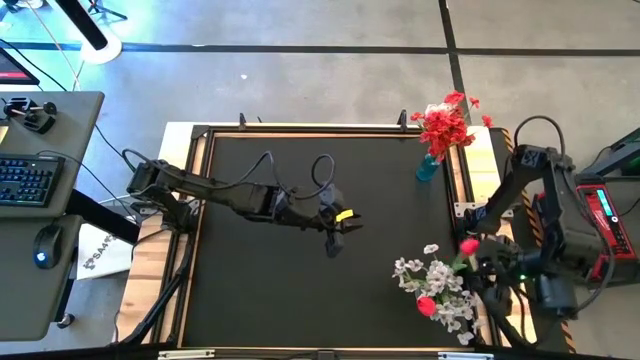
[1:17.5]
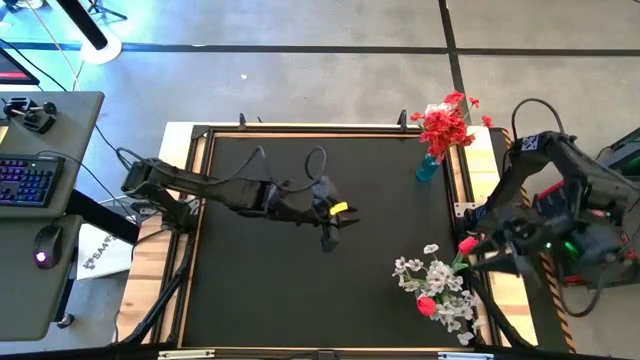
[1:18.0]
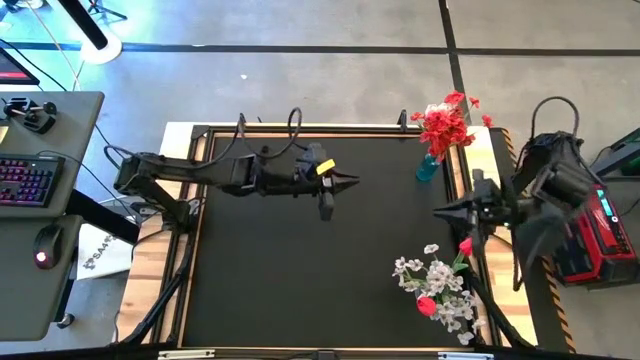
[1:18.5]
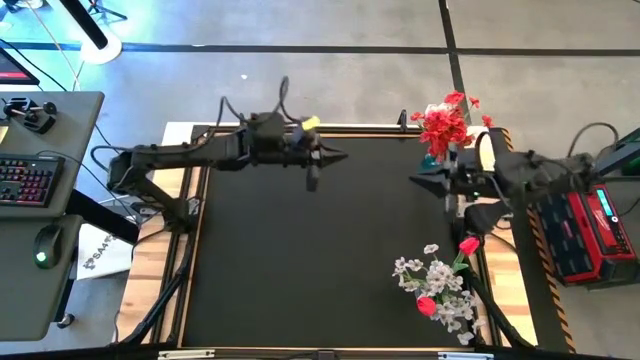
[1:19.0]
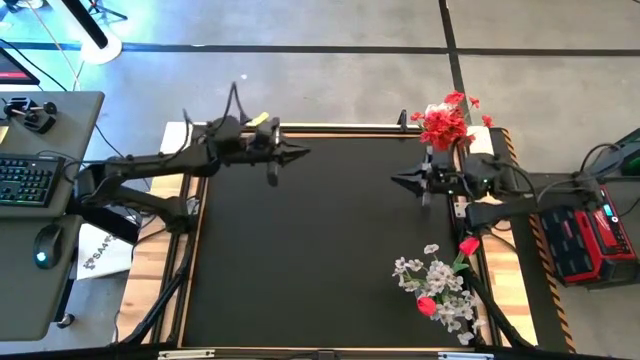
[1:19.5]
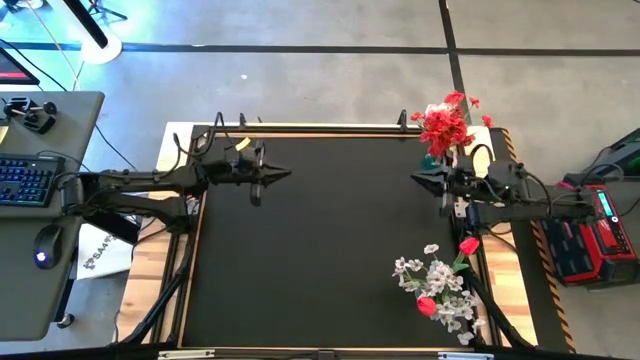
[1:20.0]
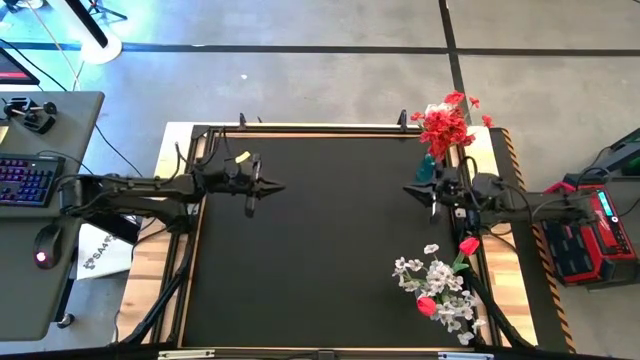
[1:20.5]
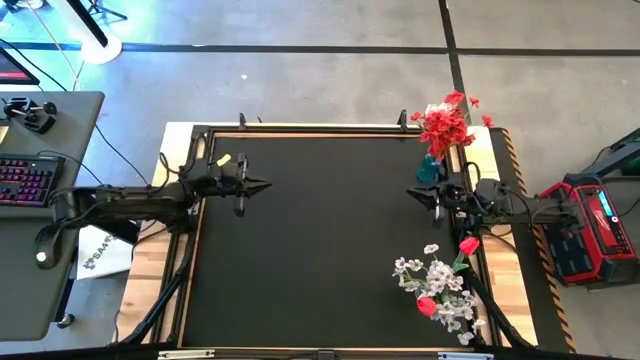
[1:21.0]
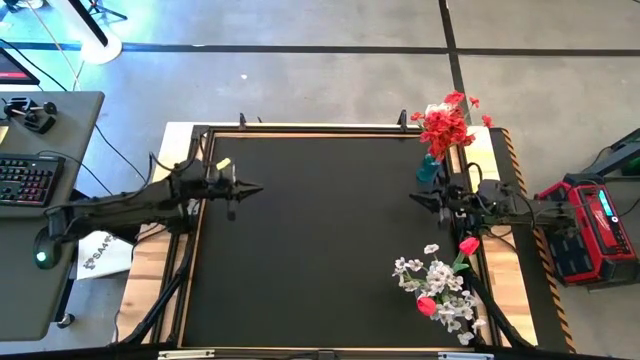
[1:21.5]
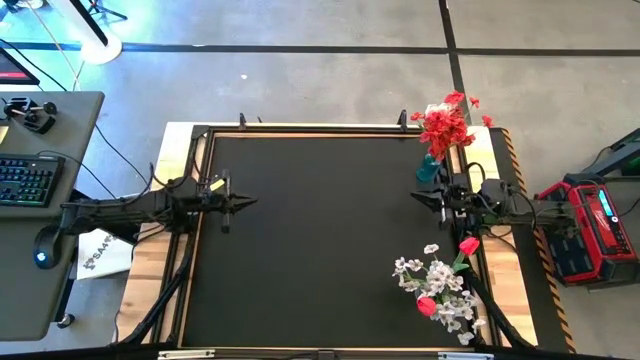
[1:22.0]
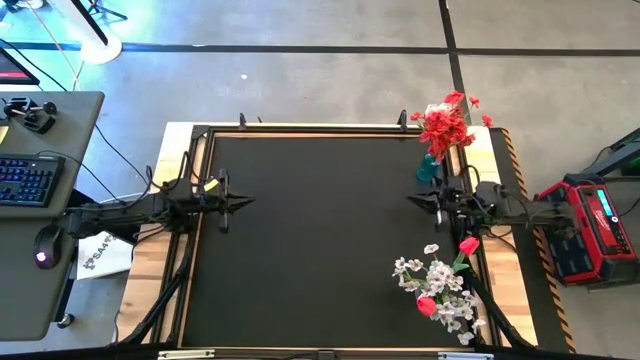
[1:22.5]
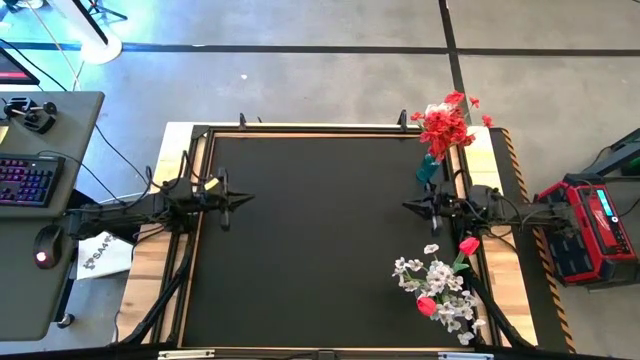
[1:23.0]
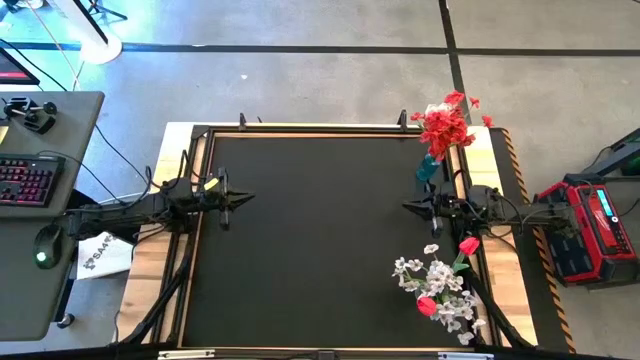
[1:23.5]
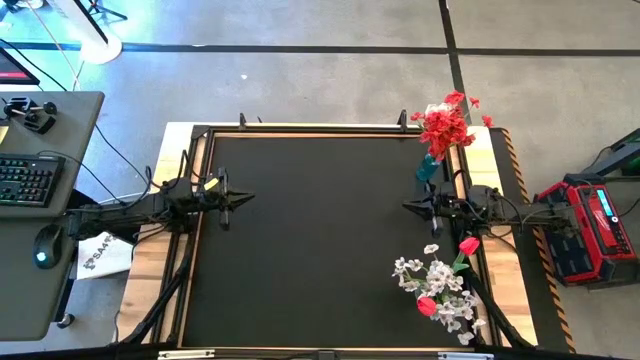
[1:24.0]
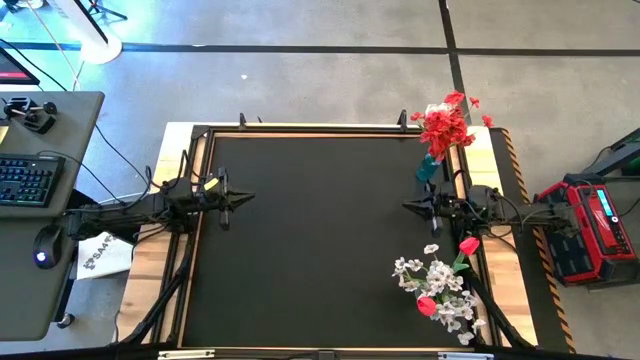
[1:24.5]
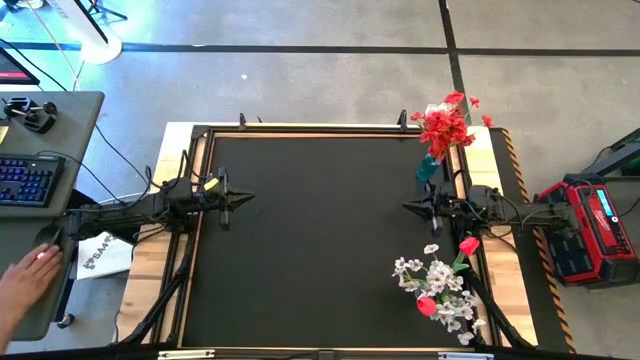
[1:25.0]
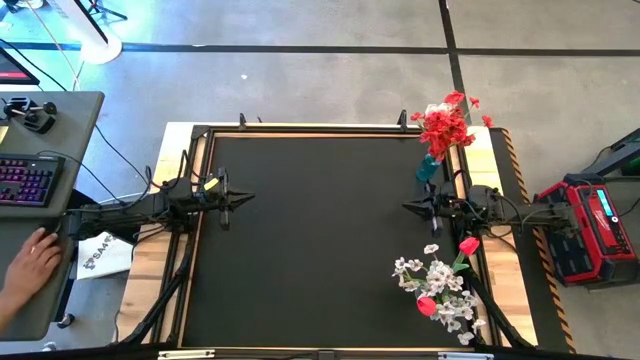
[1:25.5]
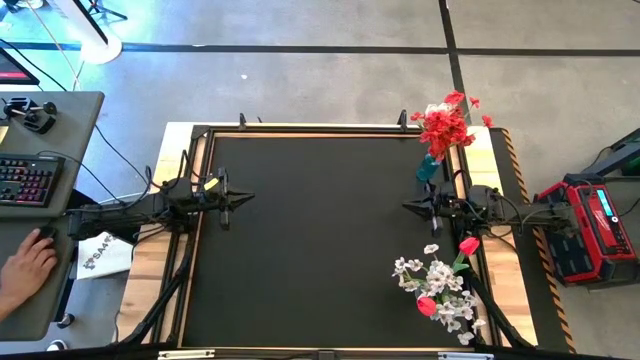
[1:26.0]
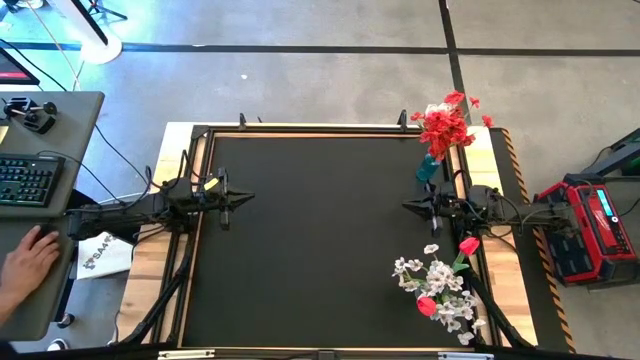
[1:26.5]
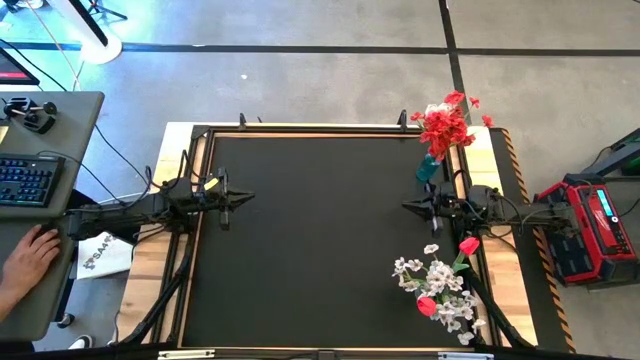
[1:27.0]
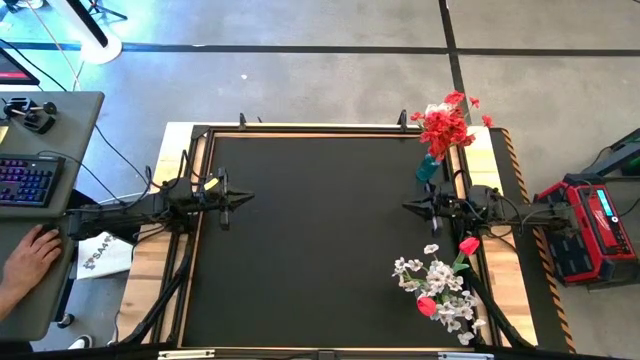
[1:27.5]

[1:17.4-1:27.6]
Task: Sort flowers into vase by color
Return to Home Position

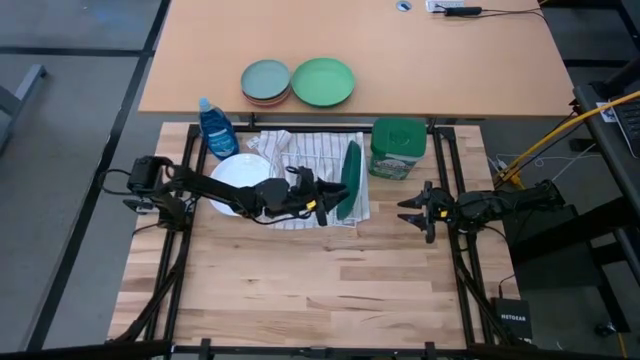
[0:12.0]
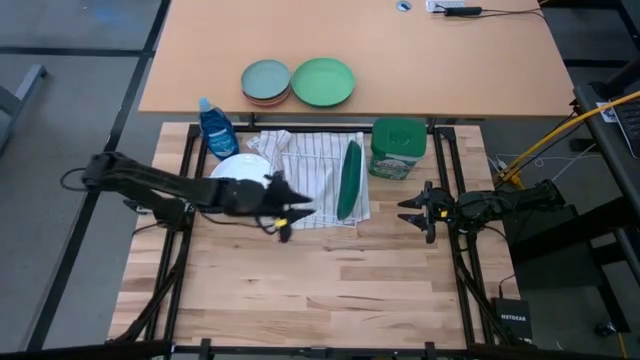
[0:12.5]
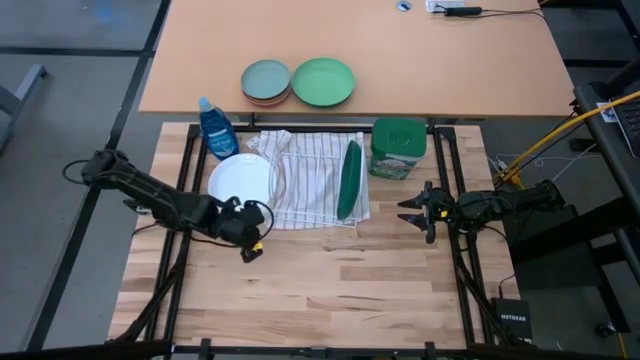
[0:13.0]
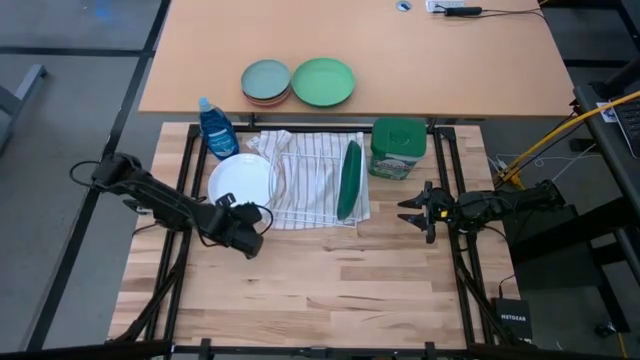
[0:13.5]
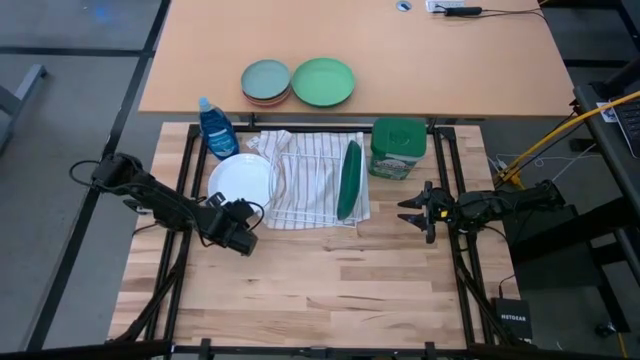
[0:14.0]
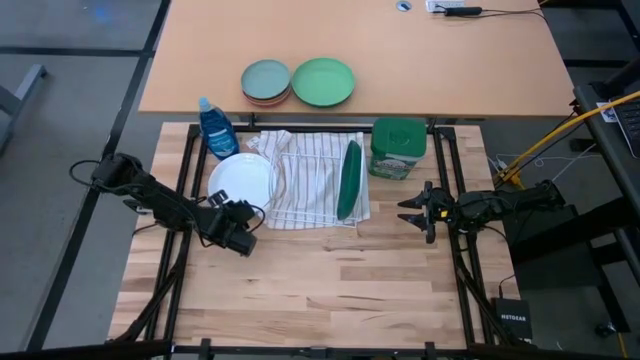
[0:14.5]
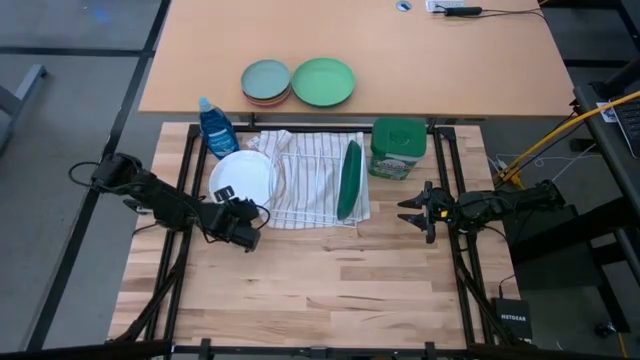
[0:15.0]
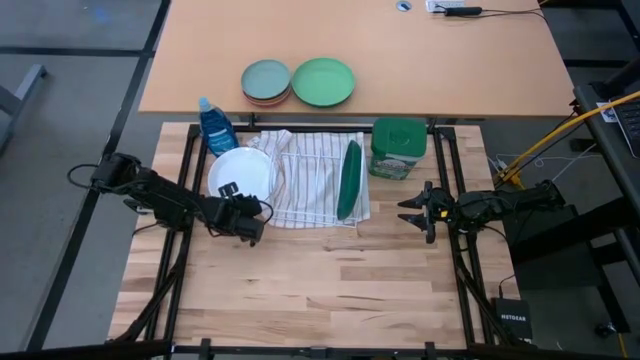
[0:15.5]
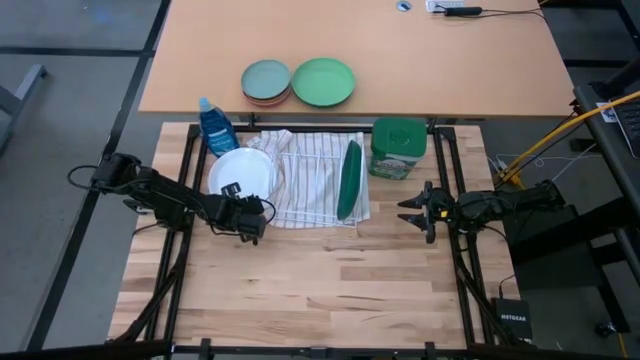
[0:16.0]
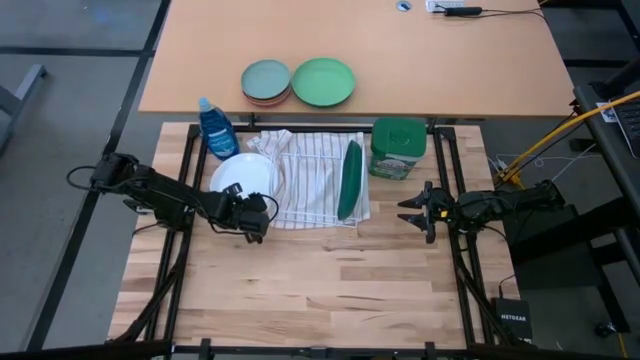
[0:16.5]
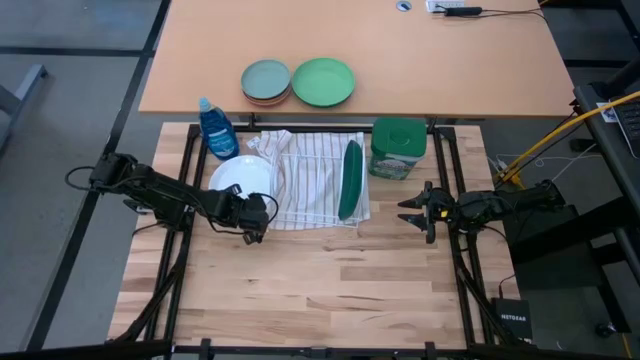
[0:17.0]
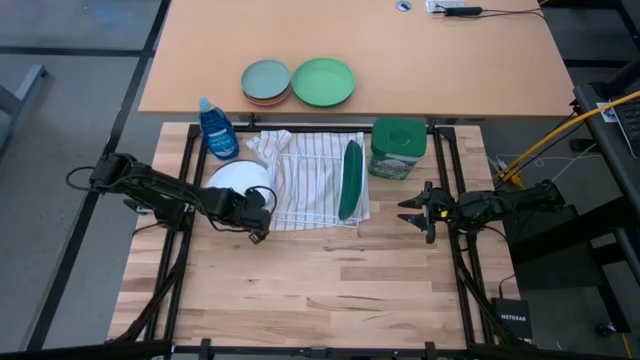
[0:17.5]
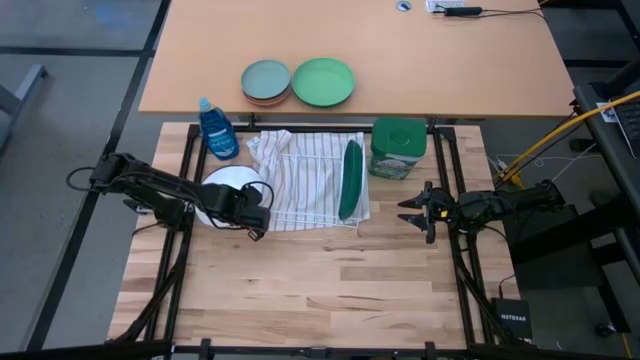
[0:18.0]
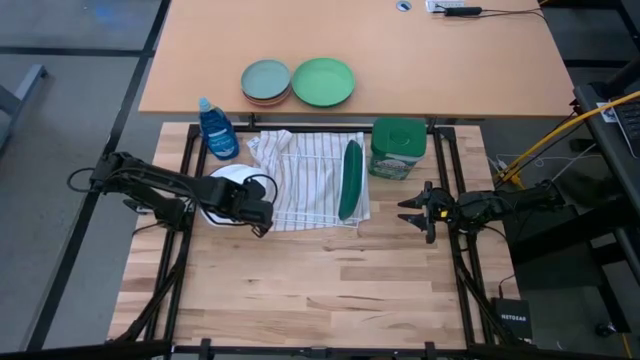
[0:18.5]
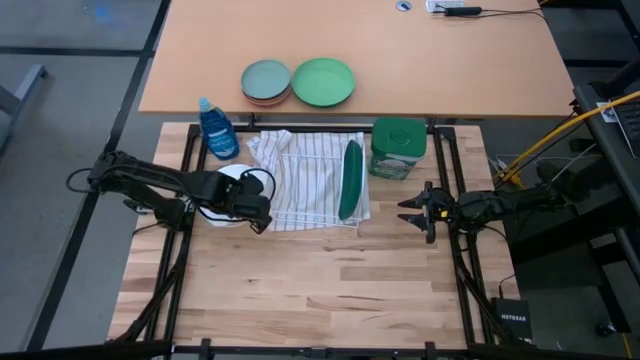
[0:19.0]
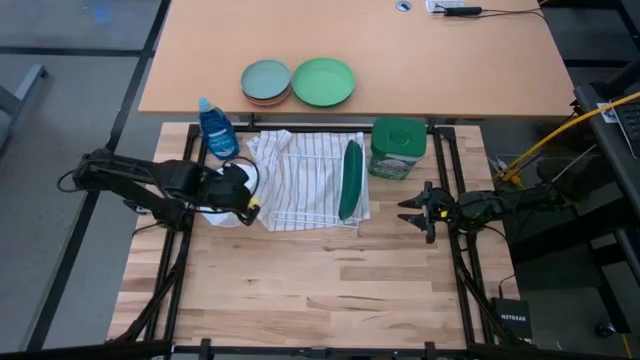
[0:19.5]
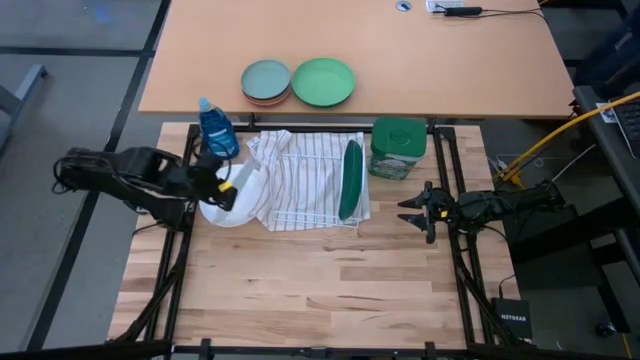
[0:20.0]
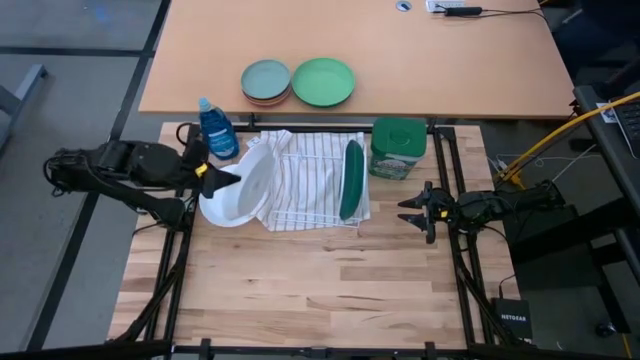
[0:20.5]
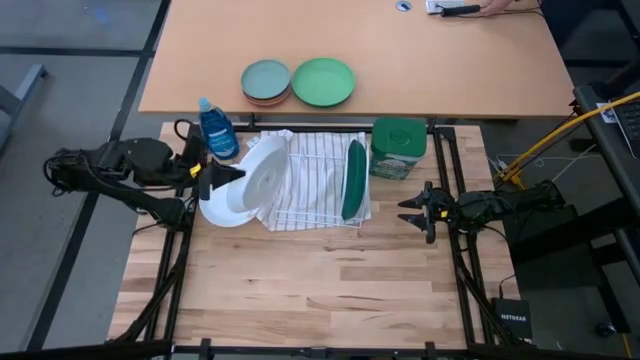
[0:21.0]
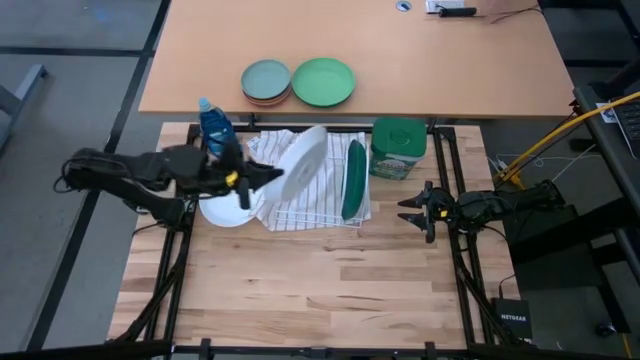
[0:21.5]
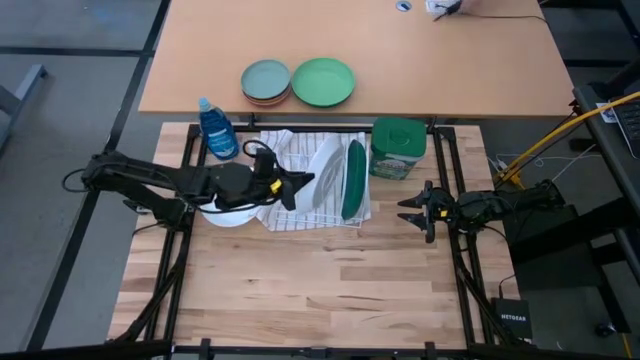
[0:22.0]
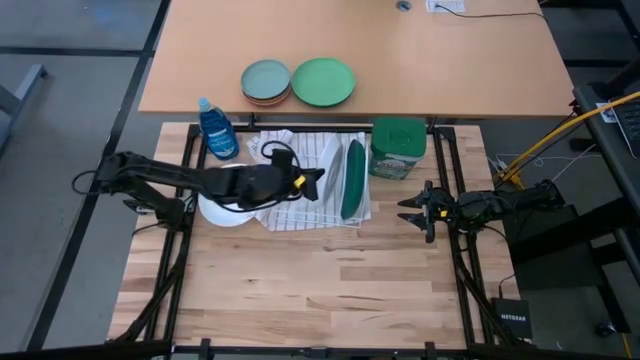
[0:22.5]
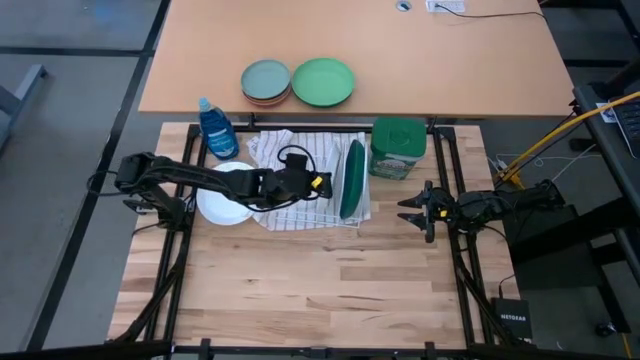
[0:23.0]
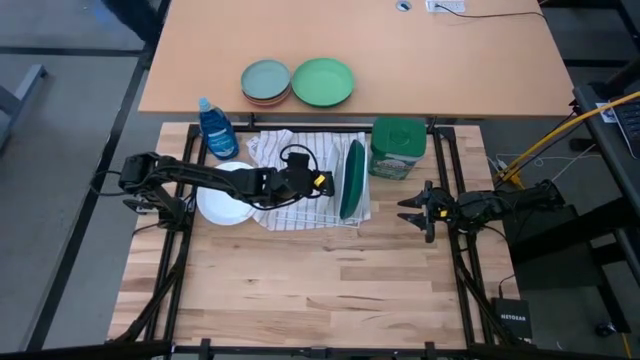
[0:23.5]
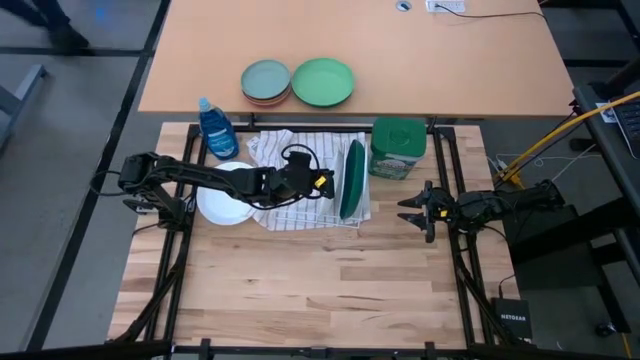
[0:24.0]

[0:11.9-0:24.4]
Task: Sort dishes
Put the white plate into the dish rack
